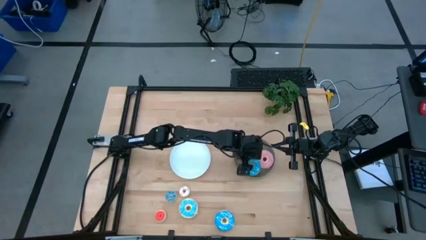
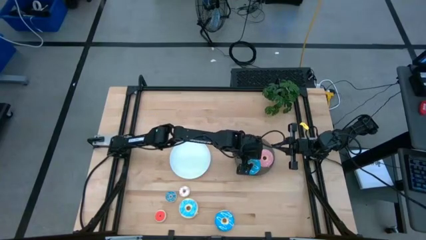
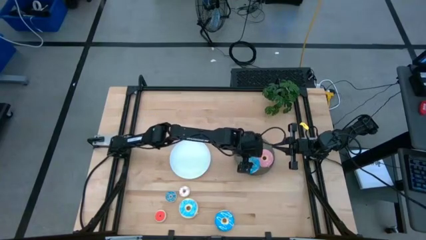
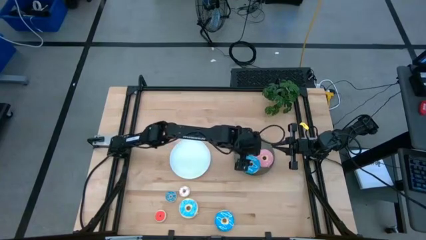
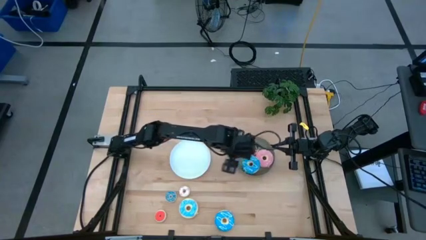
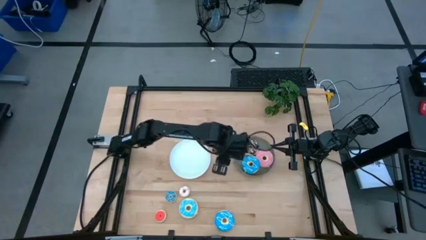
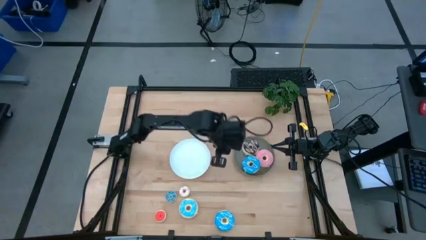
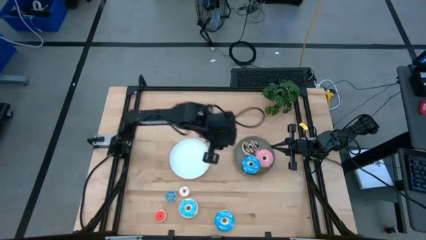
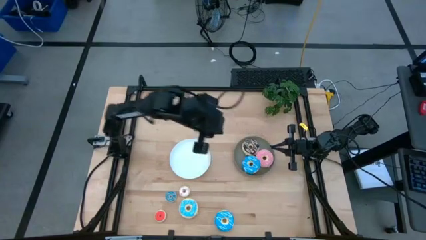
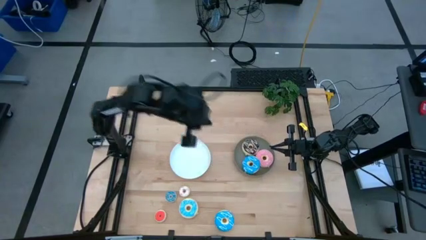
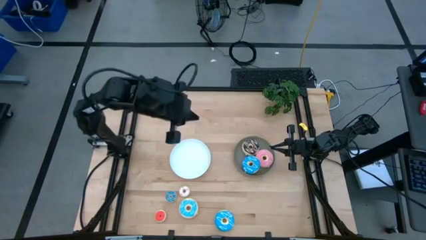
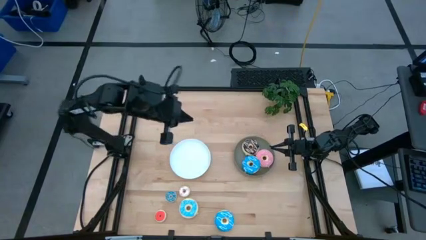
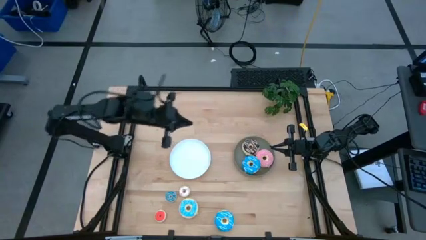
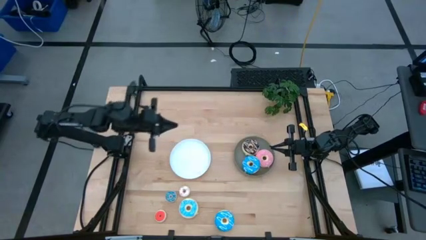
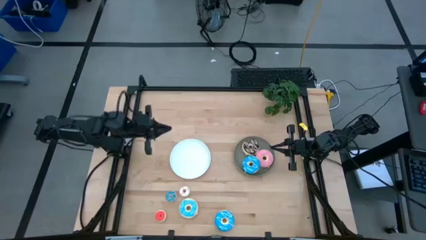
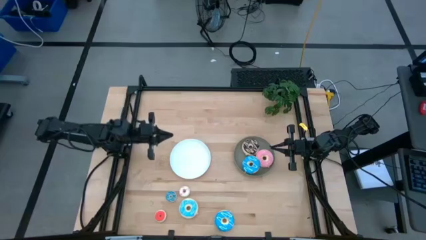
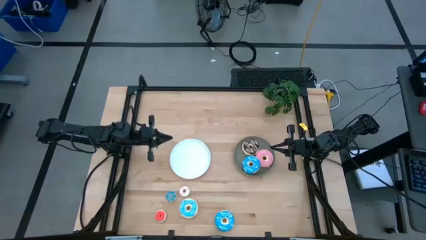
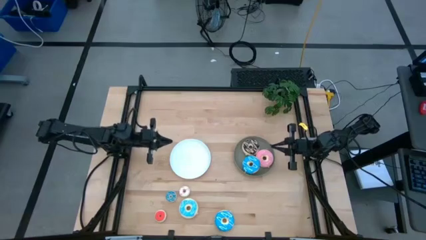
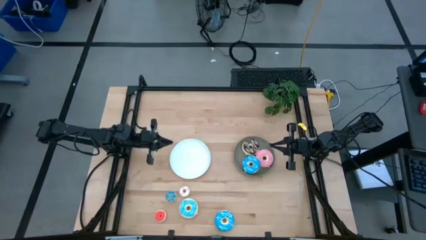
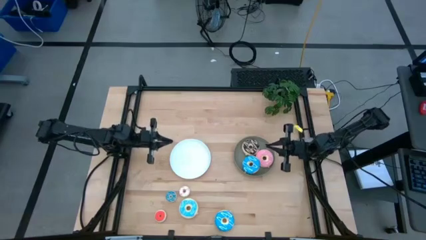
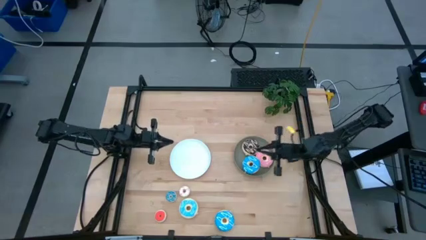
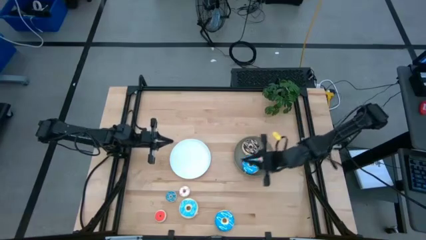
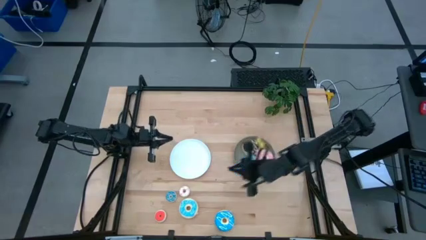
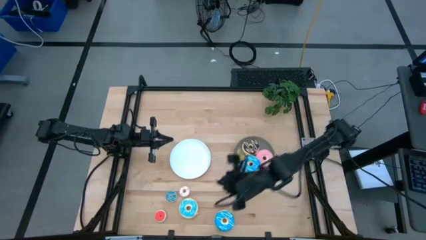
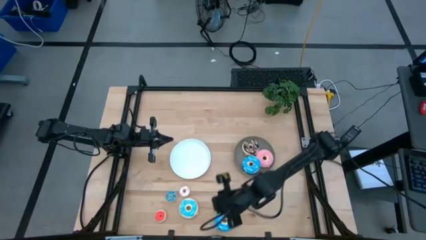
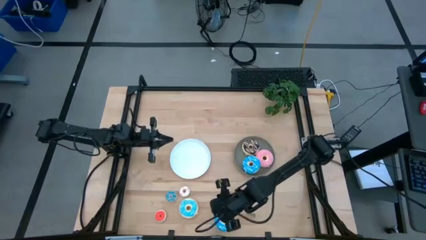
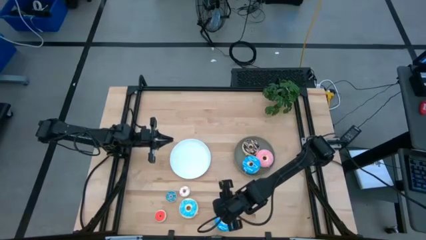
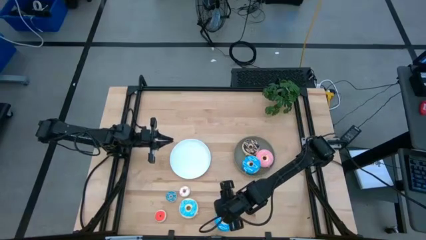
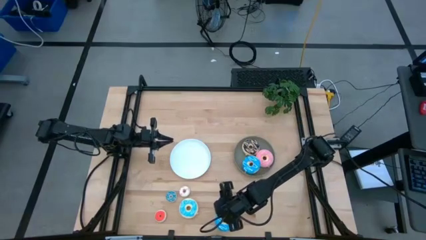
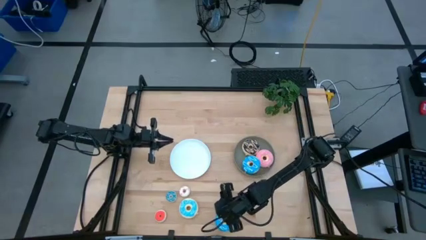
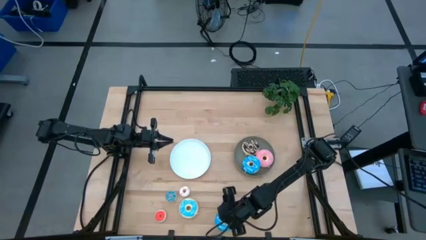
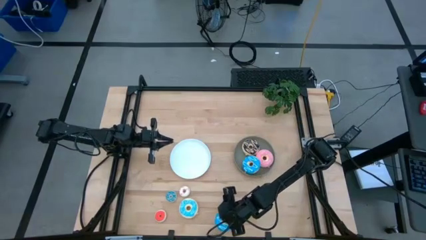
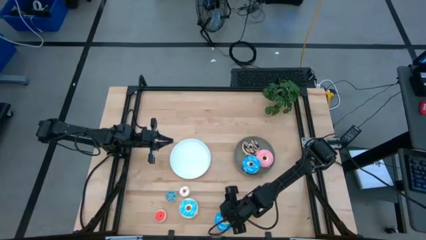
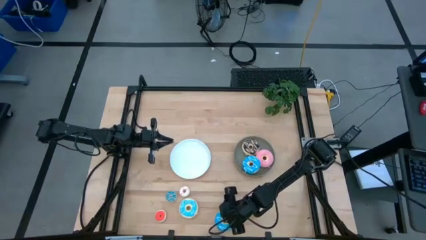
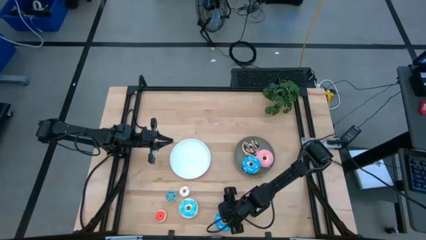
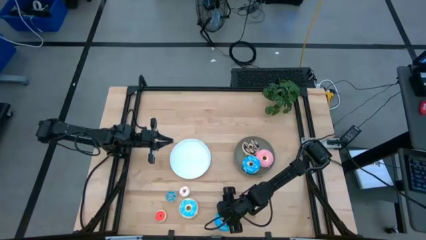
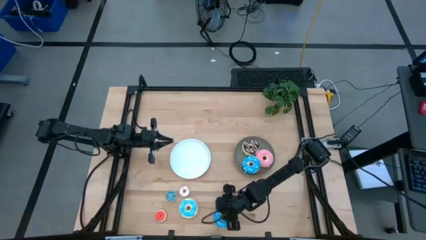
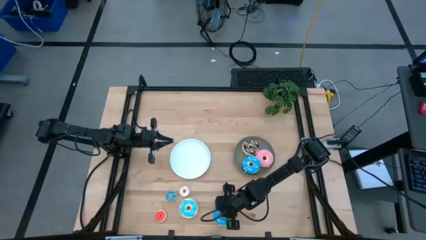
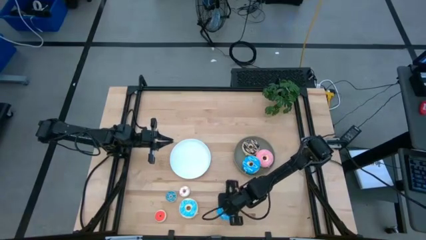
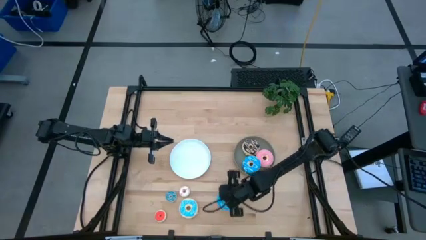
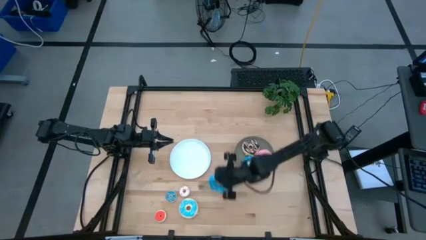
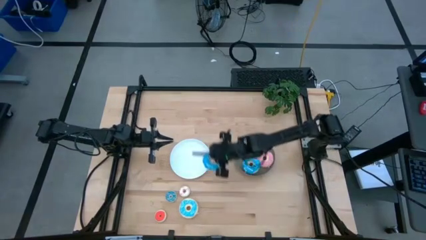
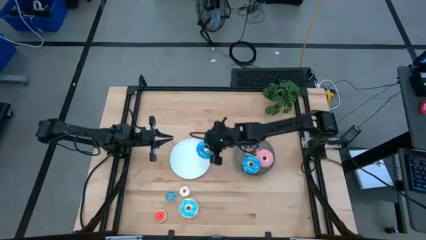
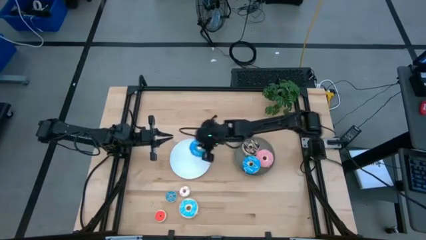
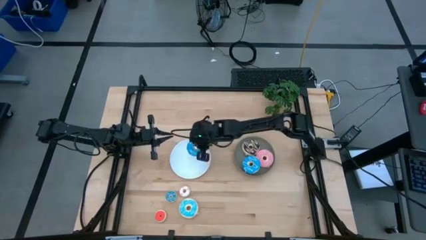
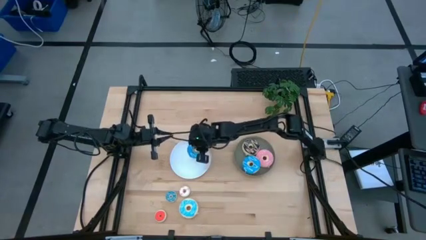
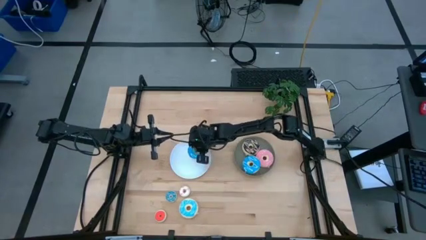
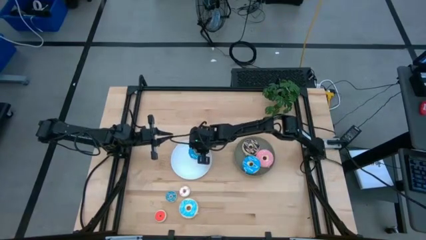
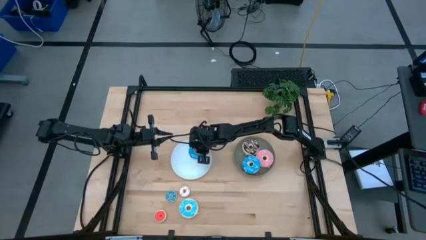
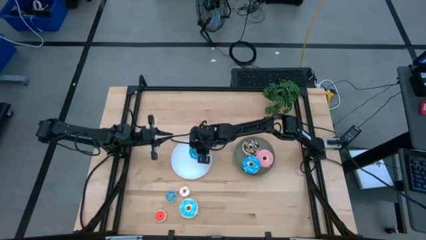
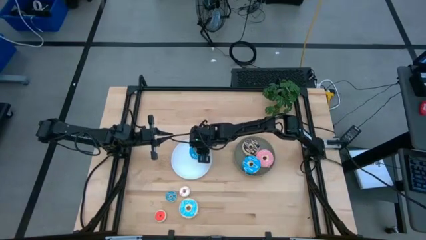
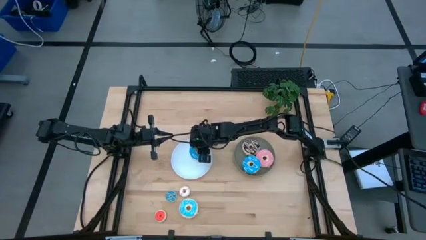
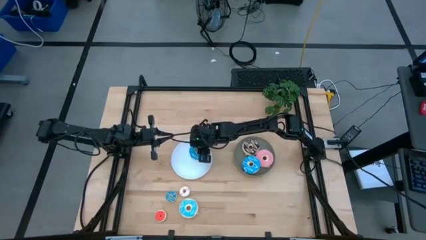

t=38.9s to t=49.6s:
Task: Pick & Place donuts
Put the large blue donut on the white plate

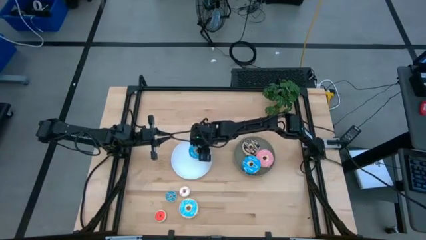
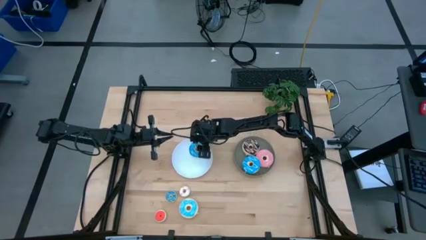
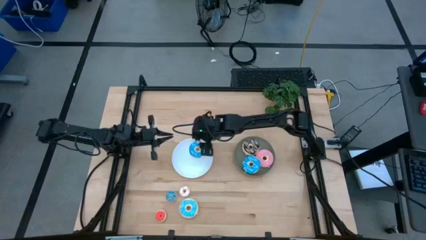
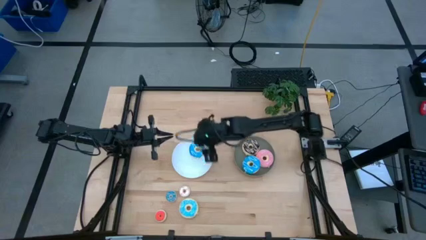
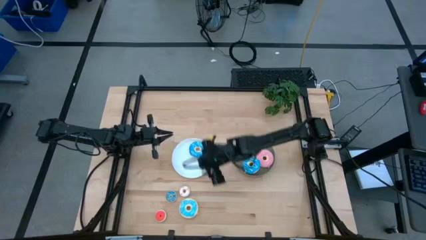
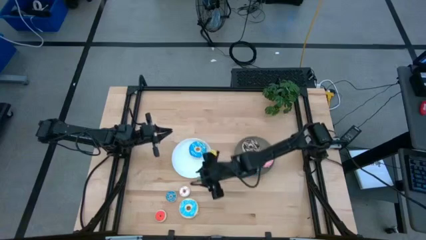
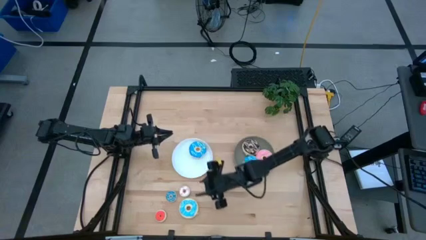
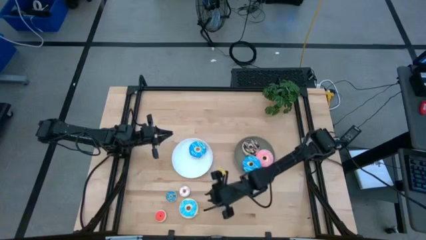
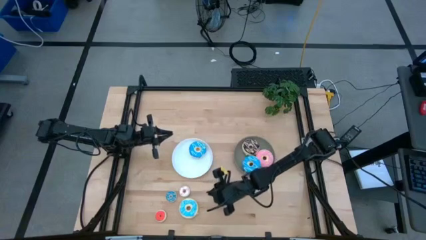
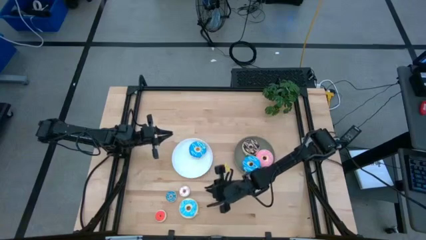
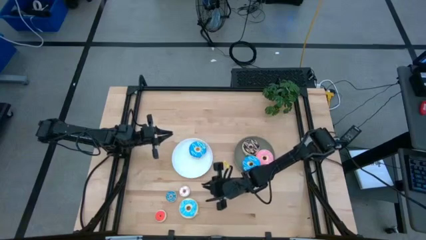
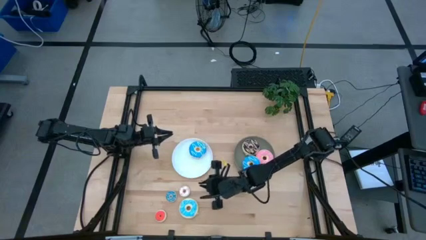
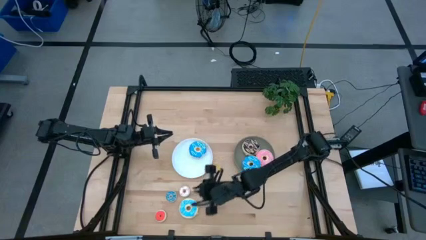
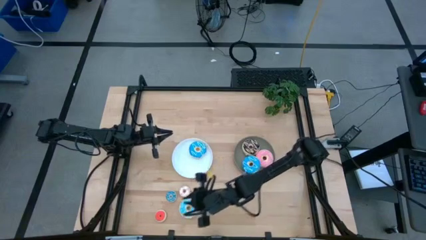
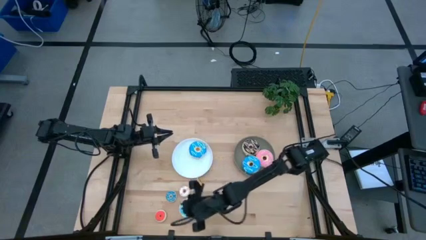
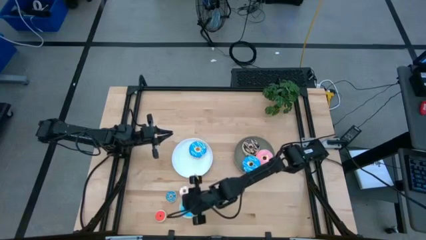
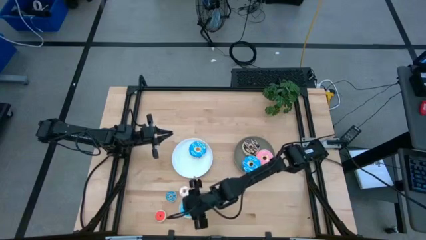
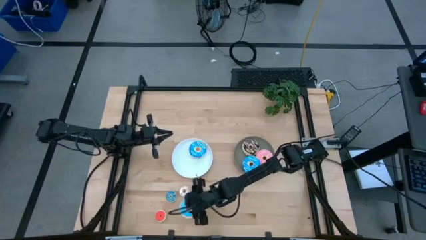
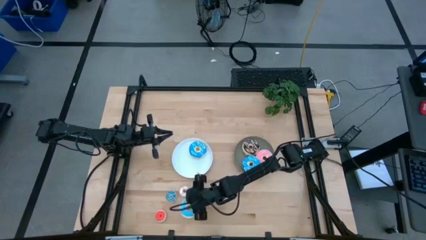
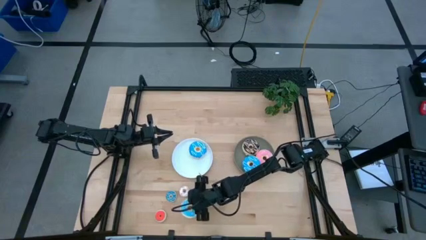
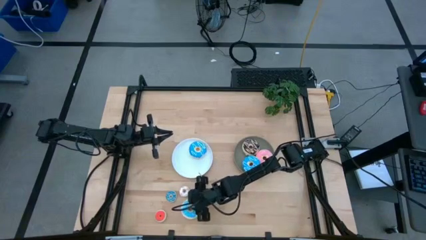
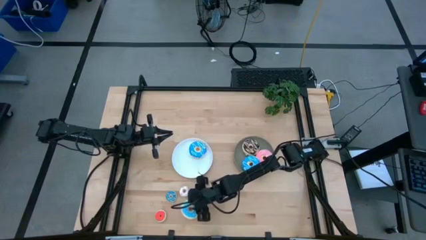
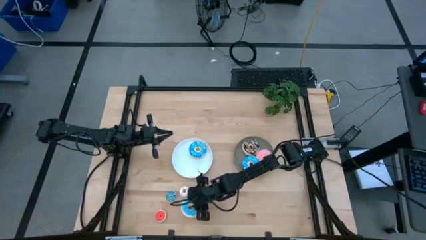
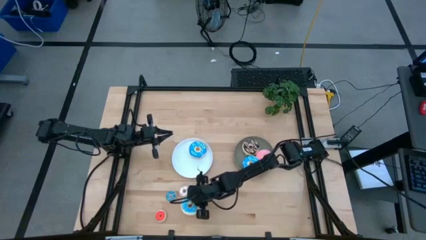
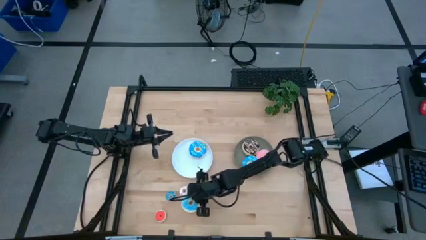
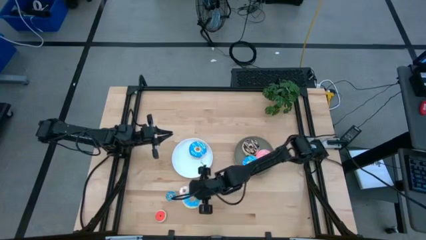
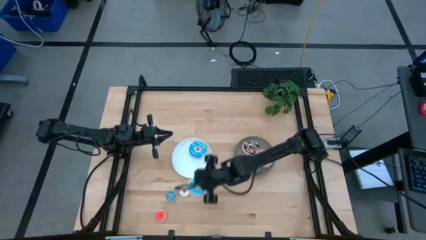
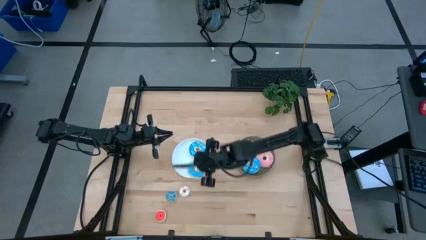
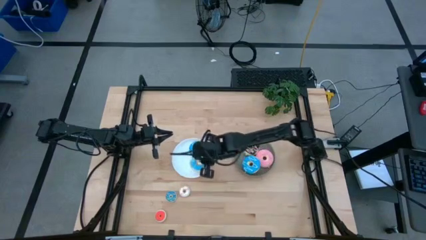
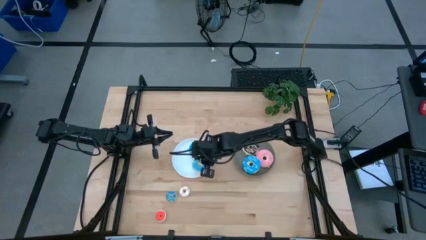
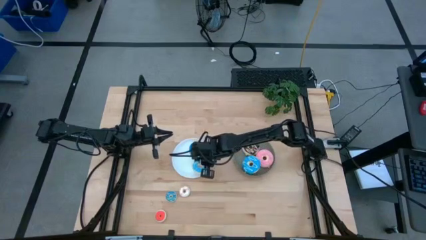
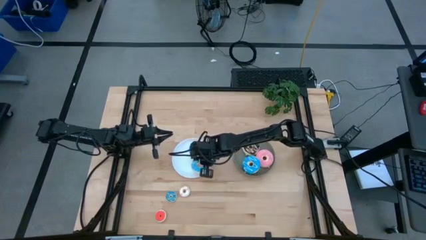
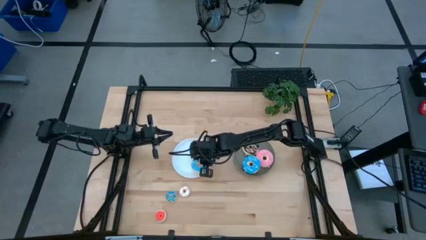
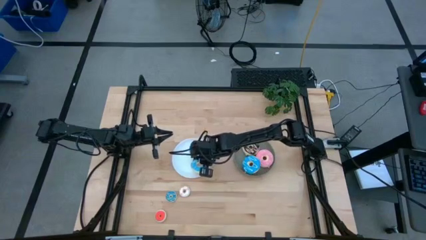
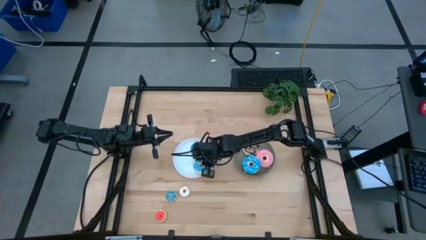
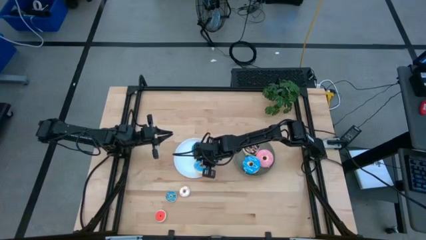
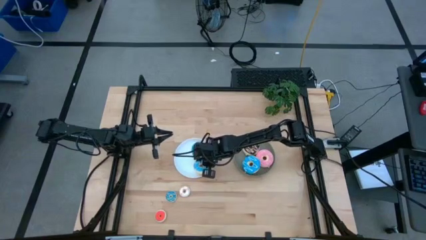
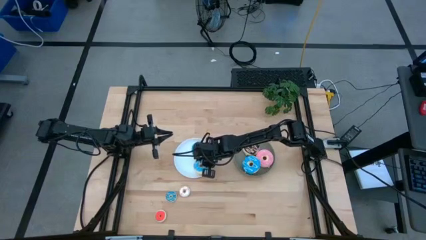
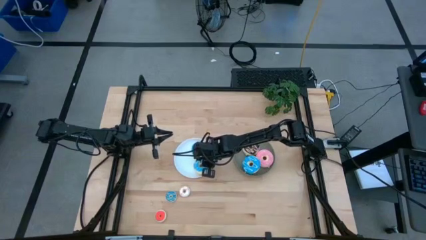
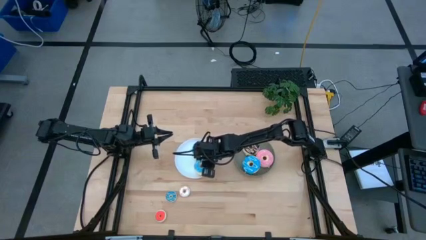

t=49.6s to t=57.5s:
Put the large light blue donut on the white plate
